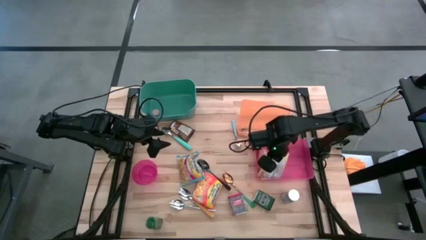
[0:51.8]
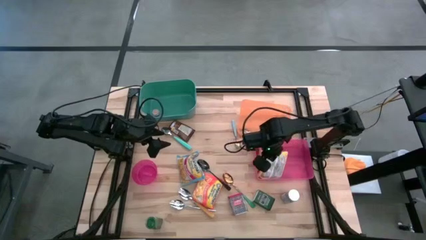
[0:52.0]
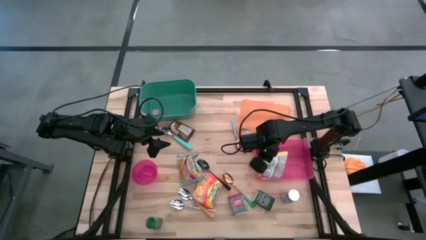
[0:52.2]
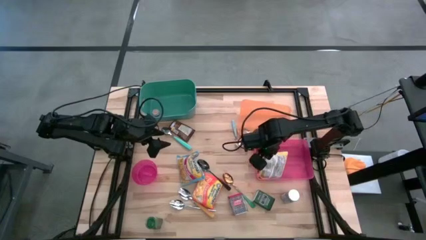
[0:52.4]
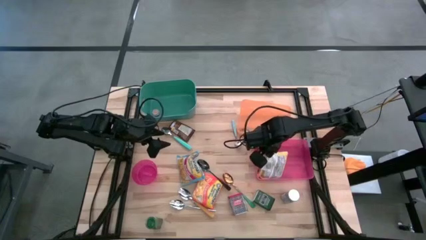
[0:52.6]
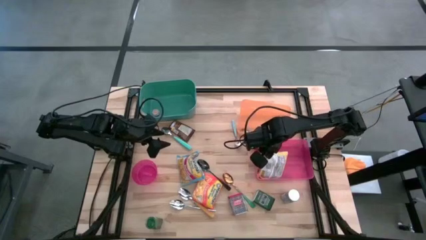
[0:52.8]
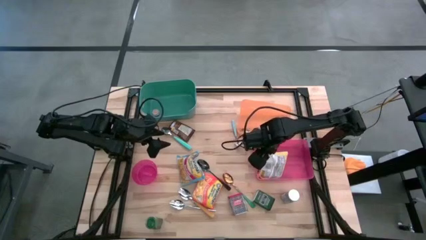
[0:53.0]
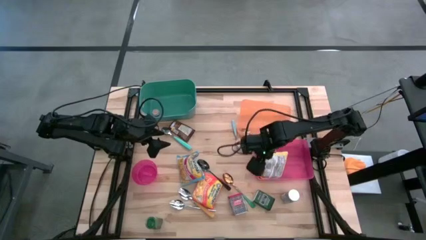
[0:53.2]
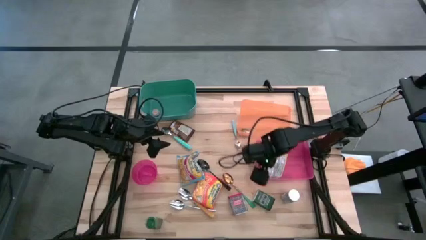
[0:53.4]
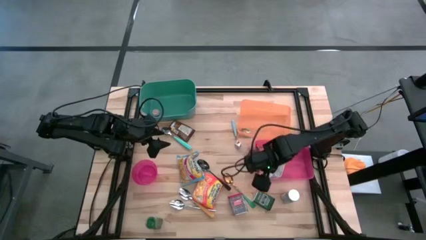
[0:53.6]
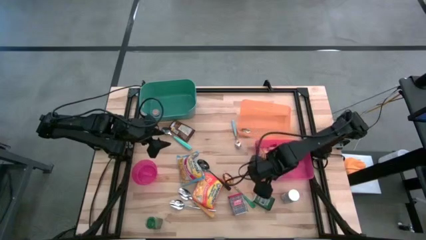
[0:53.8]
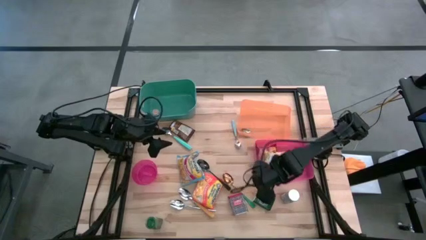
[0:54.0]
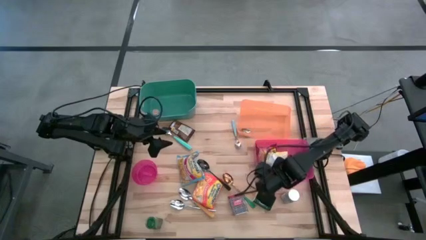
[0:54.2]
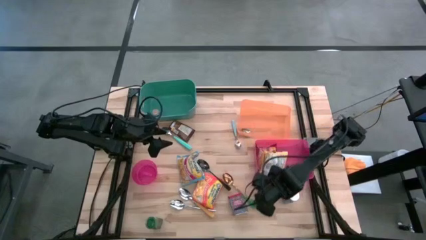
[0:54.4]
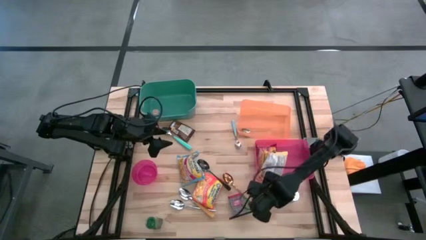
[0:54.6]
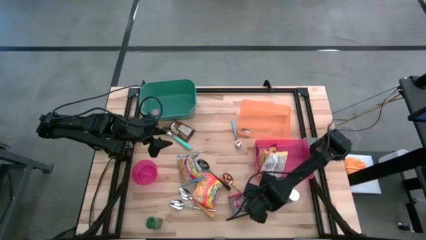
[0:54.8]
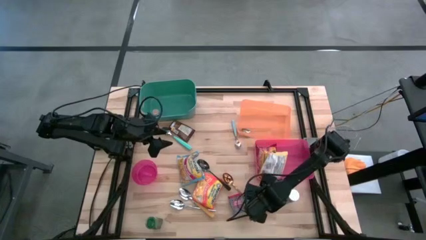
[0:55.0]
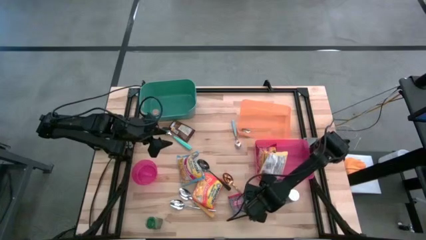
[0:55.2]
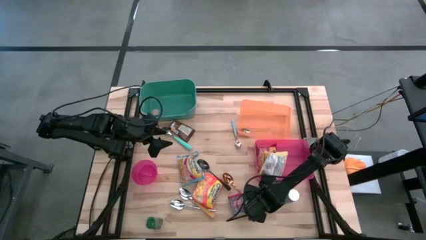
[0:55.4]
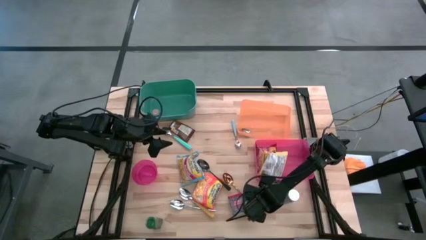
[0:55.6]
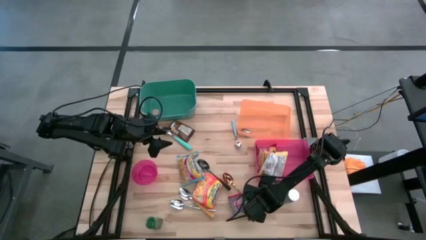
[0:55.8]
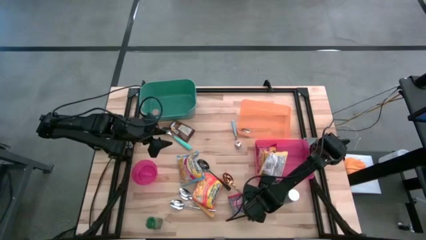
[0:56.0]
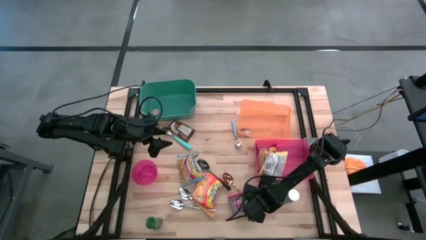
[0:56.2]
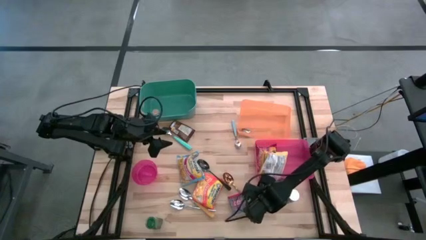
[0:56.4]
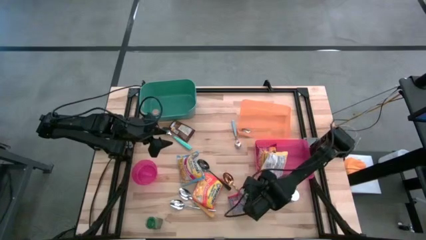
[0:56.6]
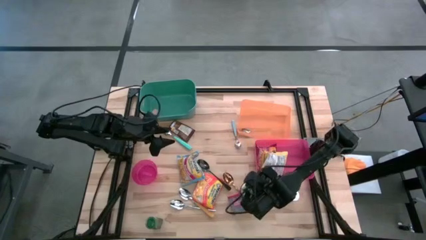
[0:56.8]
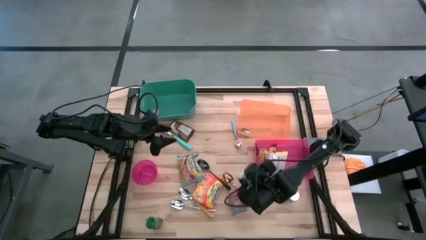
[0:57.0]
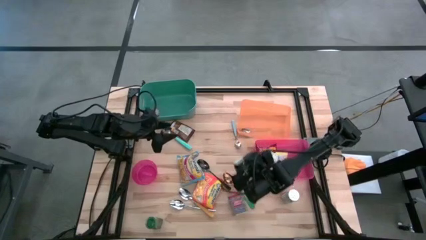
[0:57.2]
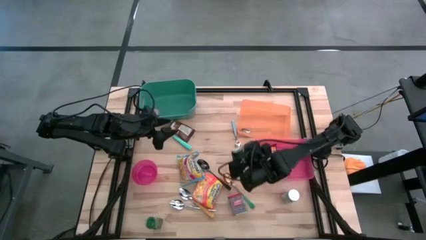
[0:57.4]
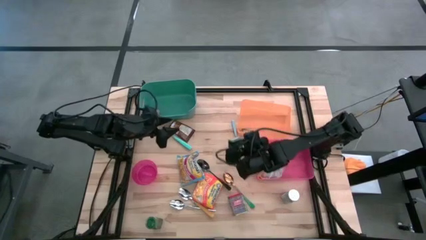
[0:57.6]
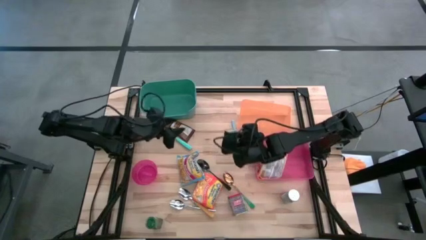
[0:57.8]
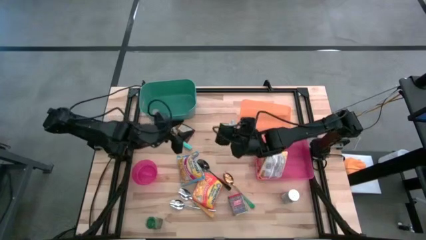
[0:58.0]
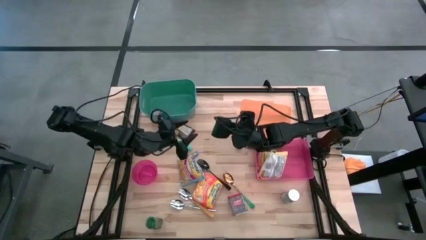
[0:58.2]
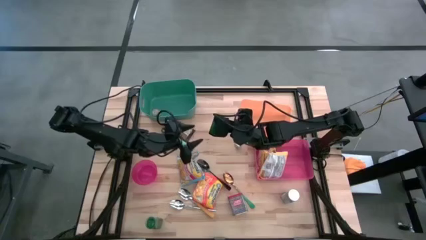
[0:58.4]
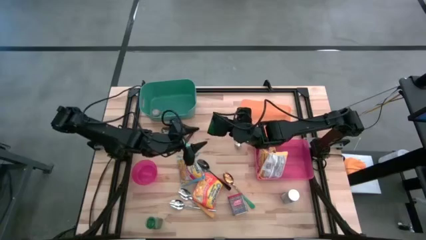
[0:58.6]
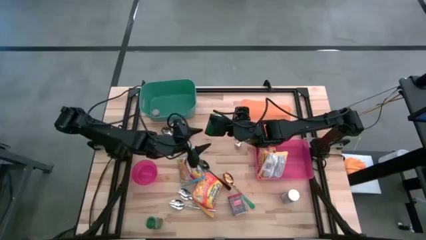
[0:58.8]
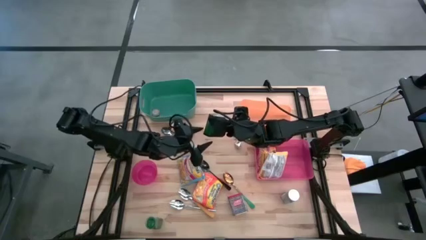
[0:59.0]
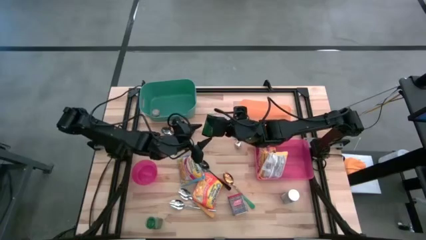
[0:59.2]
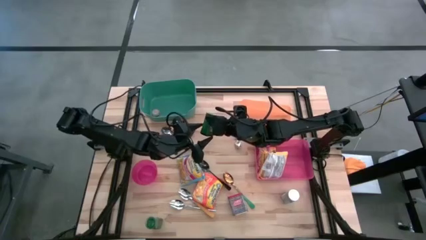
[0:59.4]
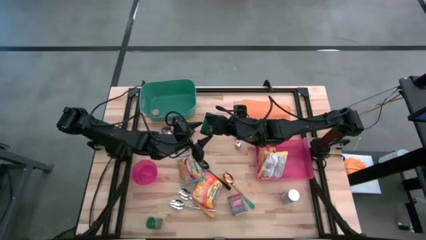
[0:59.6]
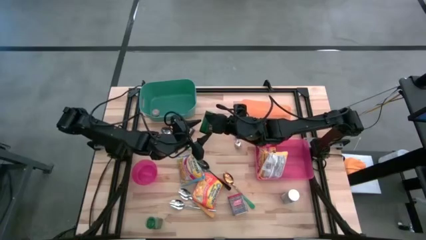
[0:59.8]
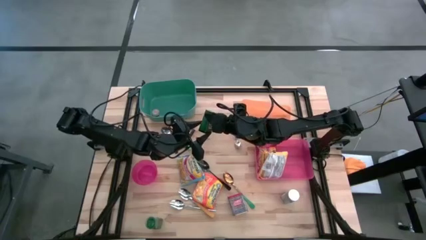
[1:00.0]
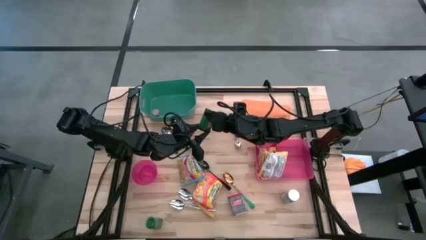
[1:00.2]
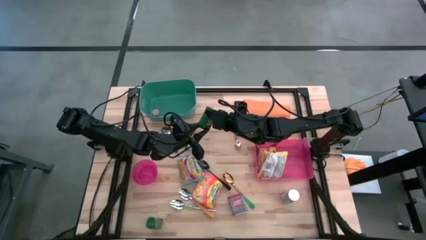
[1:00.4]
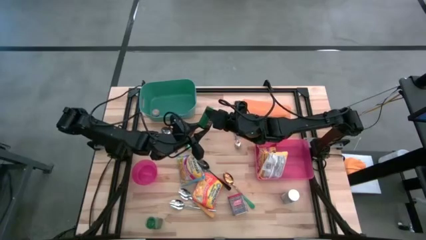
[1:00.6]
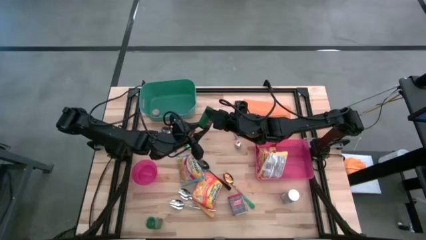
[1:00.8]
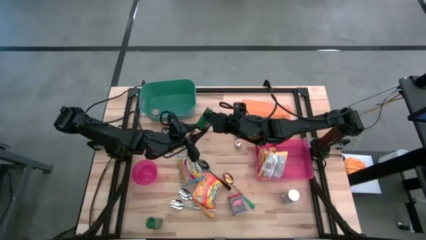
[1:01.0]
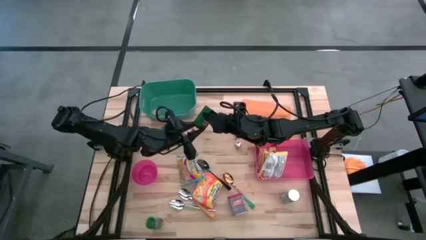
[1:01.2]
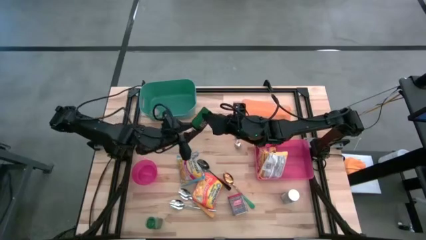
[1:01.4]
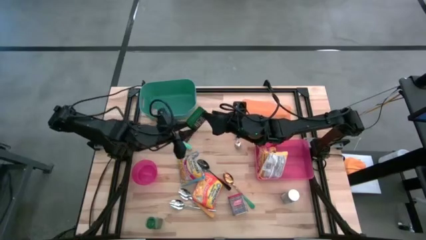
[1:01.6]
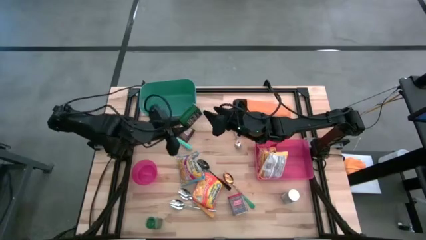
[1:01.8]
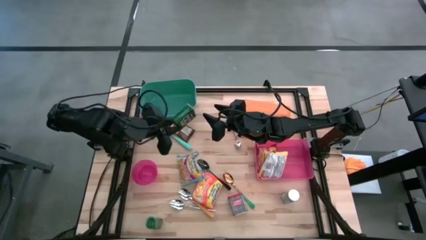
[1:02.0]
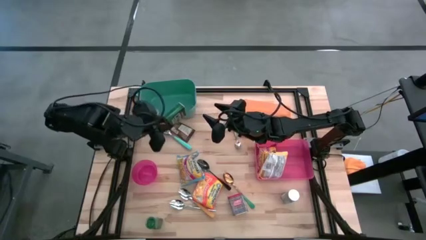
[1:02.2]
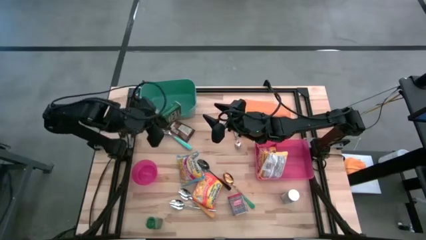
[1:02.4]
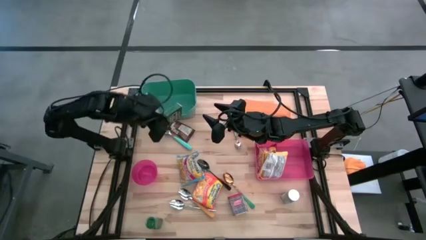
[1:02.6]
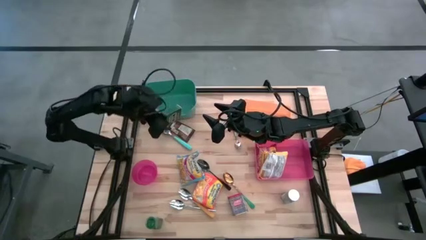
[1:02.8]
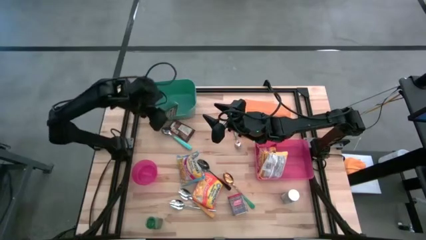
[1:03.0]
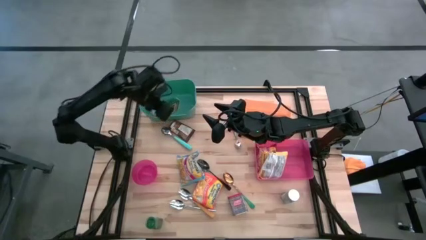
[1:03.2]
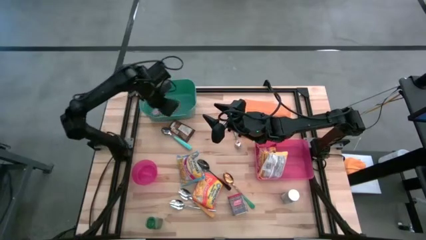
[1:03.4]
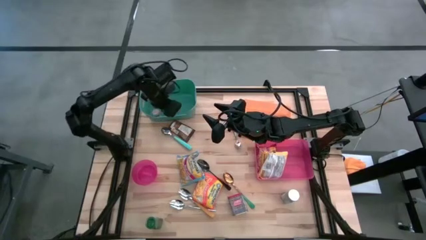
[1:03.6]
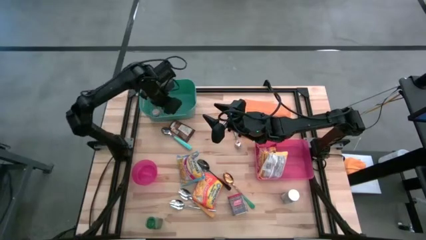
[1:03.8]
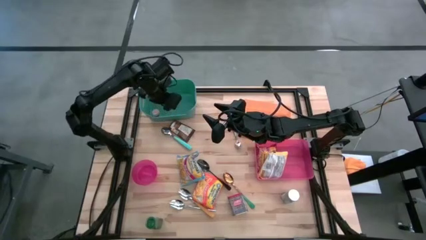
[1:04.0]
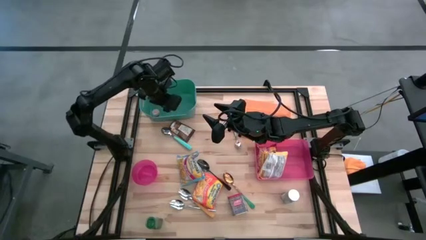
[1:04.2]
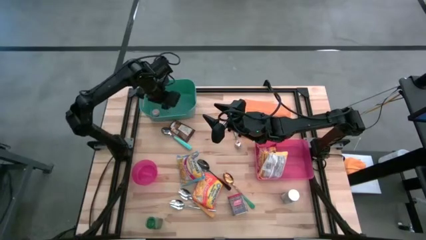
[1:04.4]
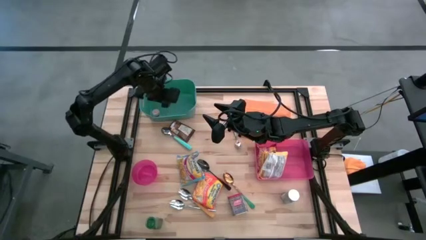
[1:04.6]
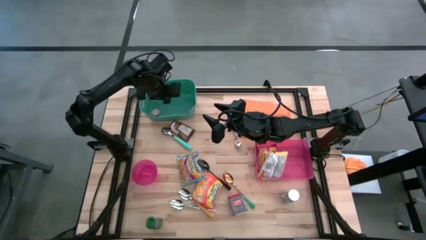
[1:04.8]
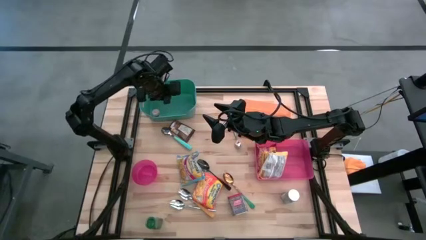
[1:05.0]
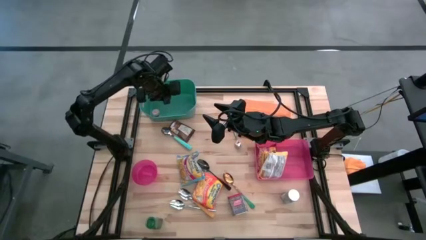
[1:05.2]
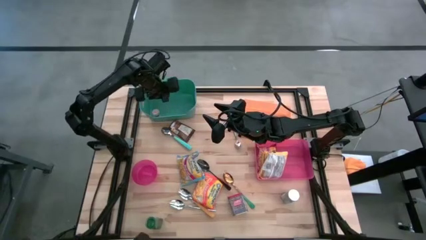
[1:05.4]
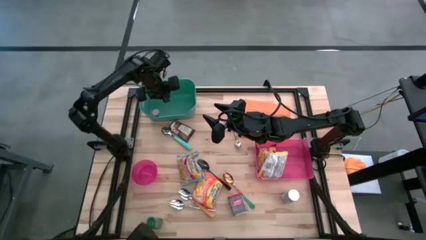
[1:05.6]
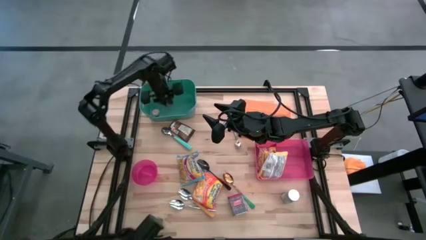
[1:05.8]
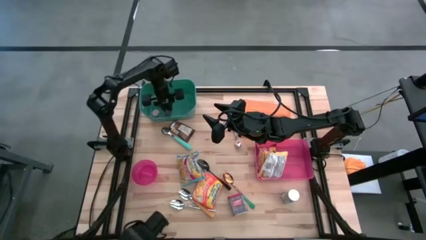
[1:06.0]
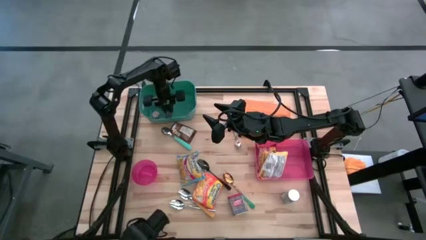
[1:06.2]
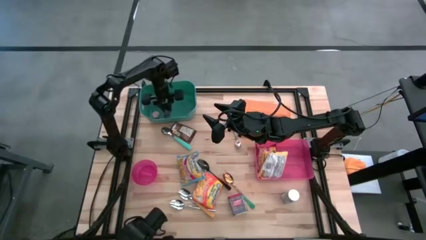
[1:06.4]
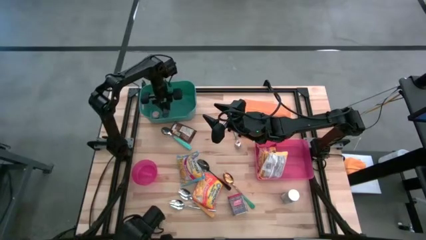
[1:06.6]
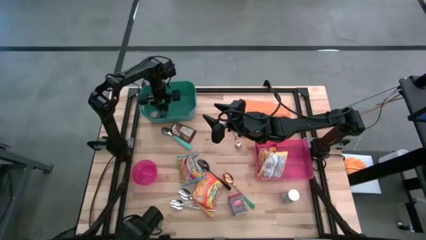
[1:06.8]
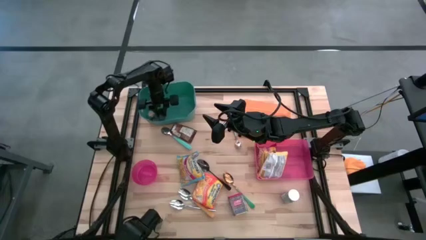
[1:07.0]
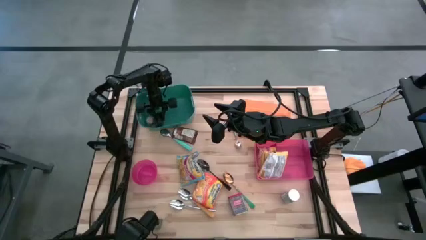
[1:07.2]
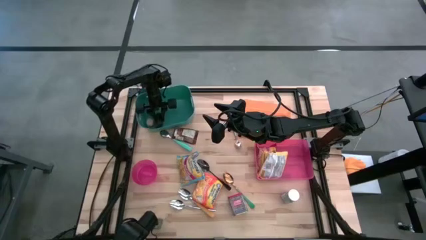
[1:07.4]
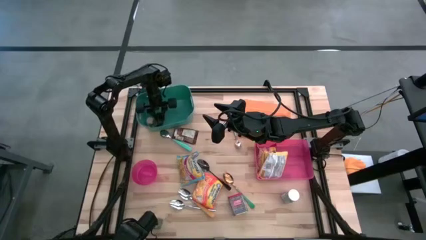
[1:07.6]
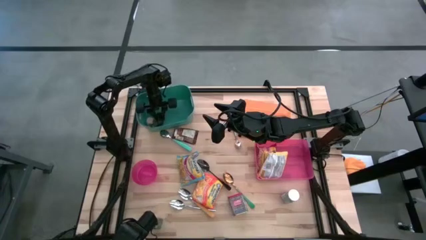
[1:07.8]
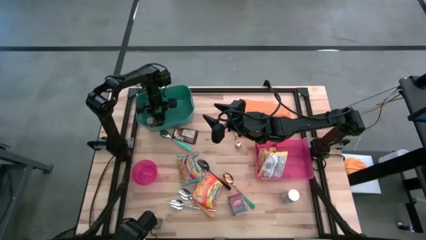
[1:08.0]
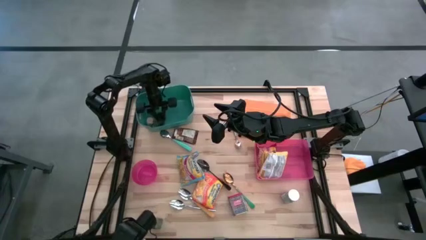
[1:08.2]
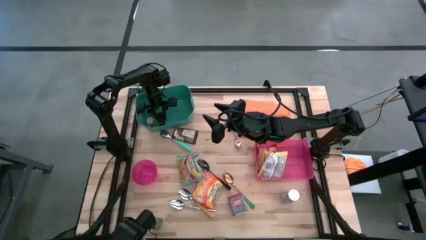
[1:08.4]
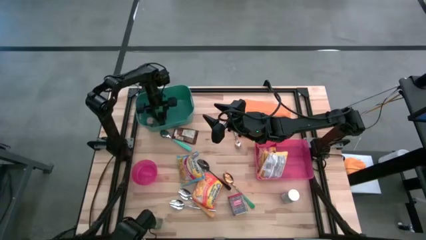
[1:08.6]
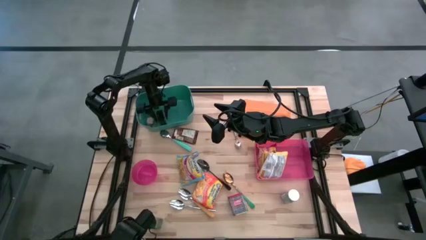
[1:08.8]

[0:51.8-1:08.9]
Put the green paprika seasoning can into the green bin
